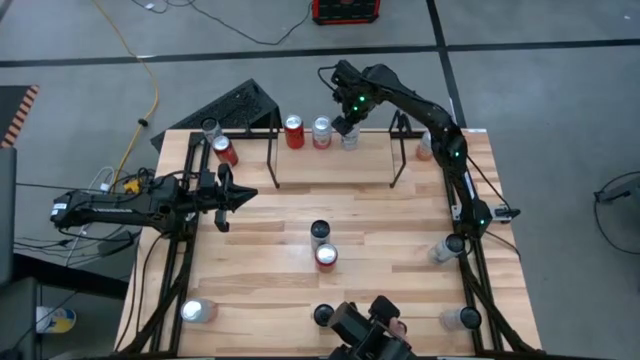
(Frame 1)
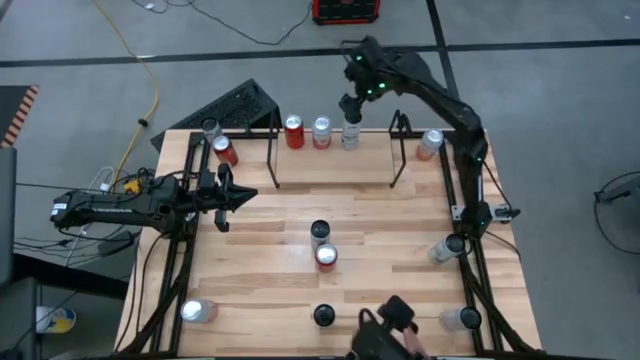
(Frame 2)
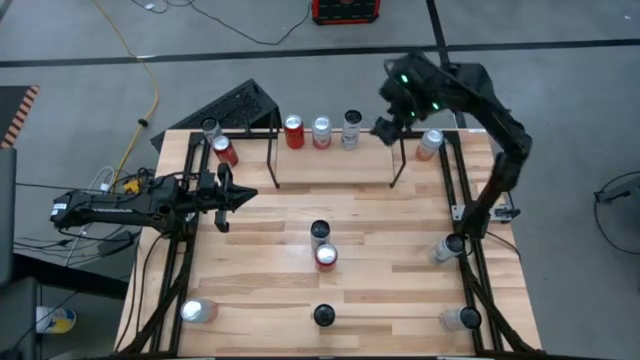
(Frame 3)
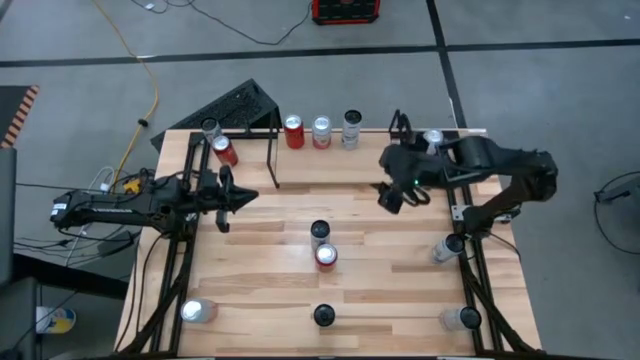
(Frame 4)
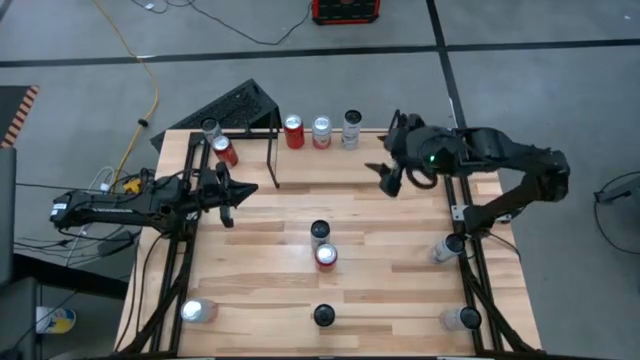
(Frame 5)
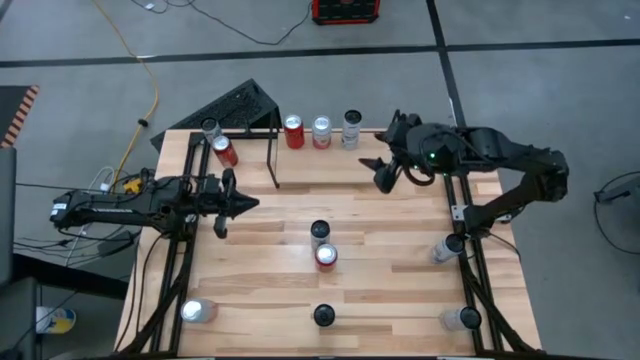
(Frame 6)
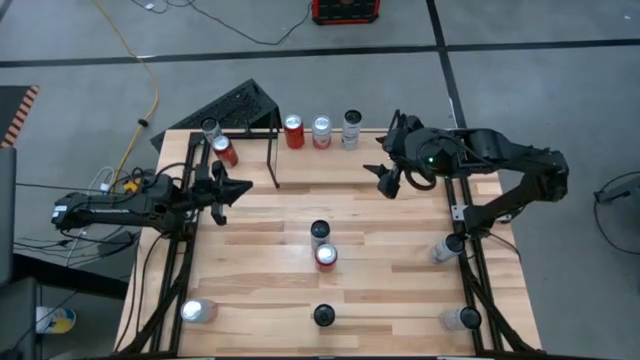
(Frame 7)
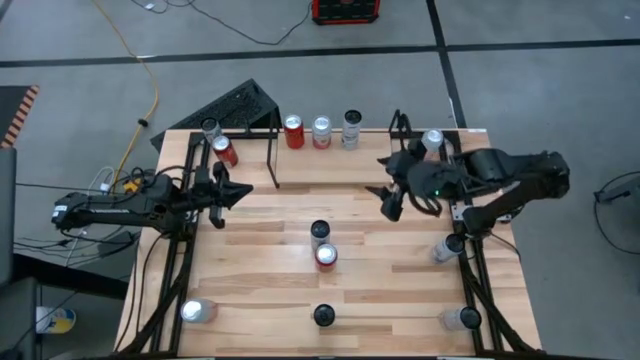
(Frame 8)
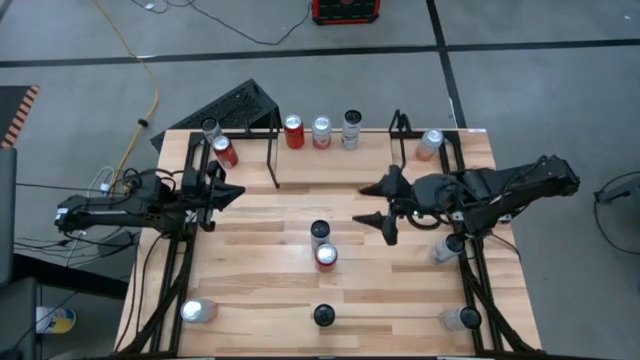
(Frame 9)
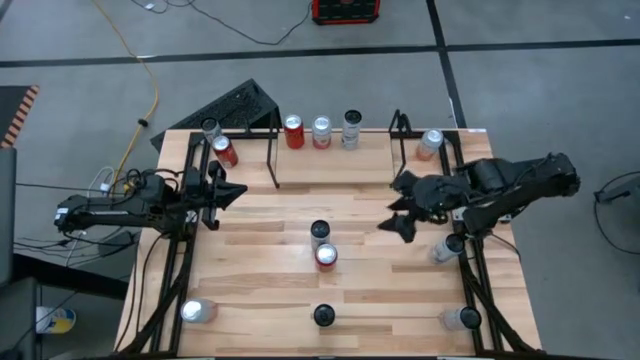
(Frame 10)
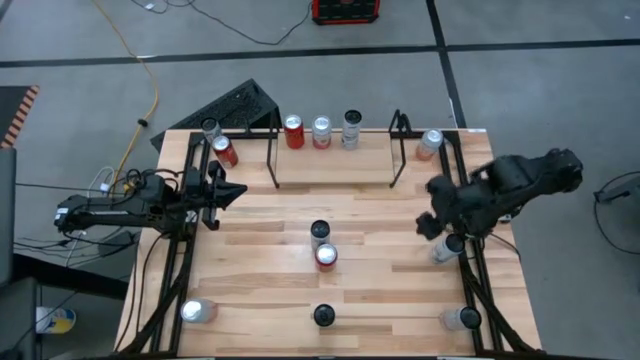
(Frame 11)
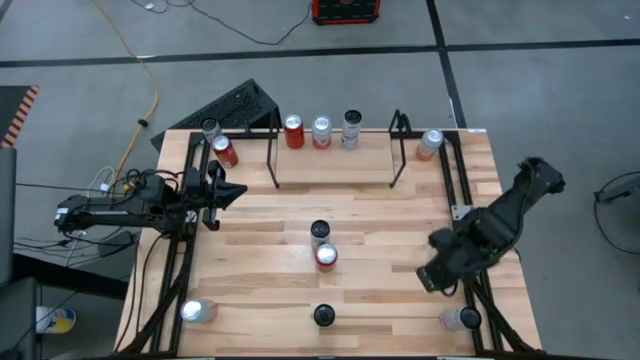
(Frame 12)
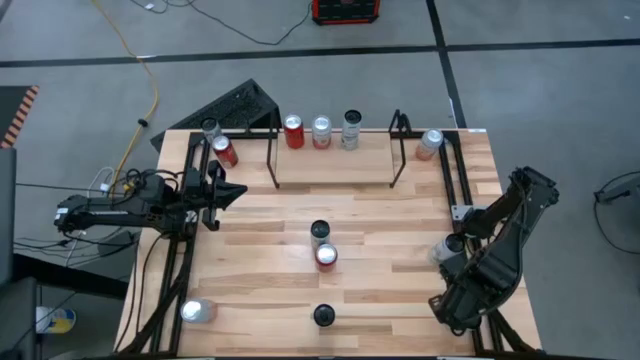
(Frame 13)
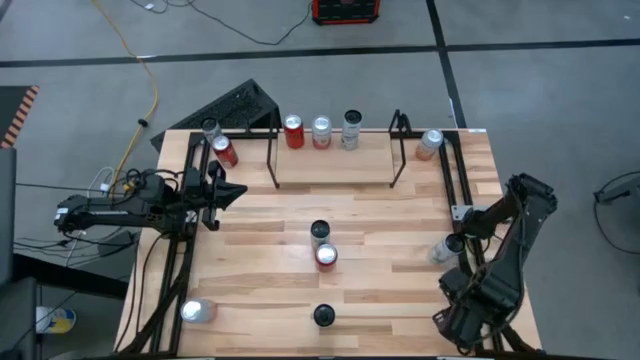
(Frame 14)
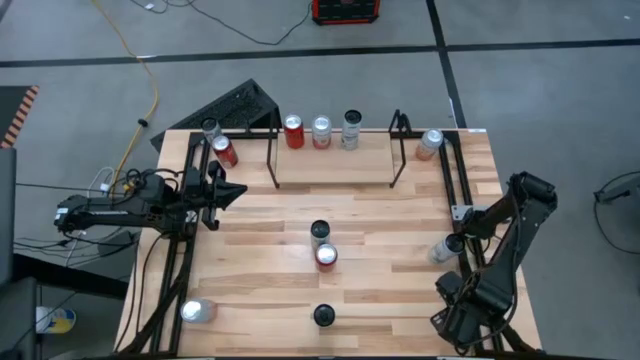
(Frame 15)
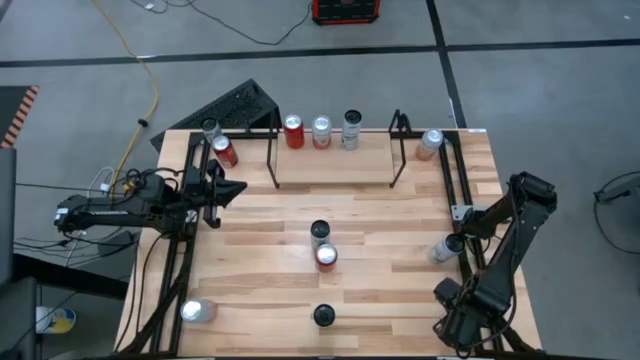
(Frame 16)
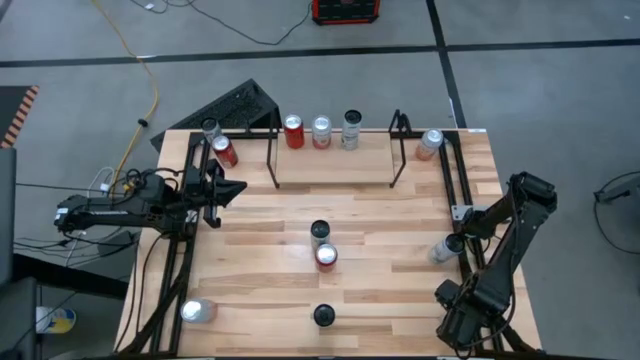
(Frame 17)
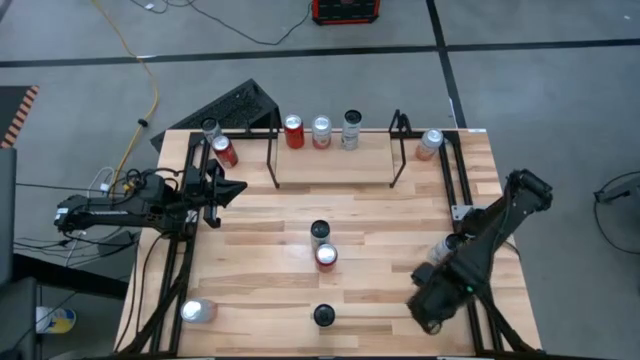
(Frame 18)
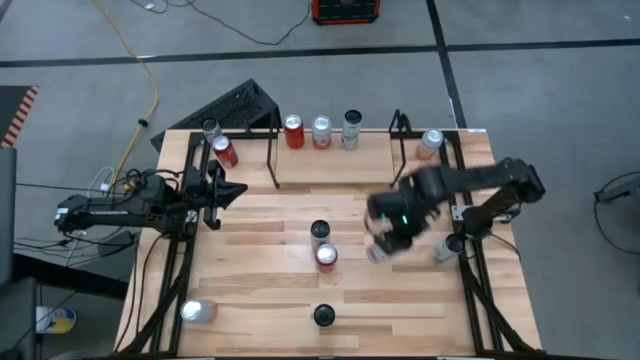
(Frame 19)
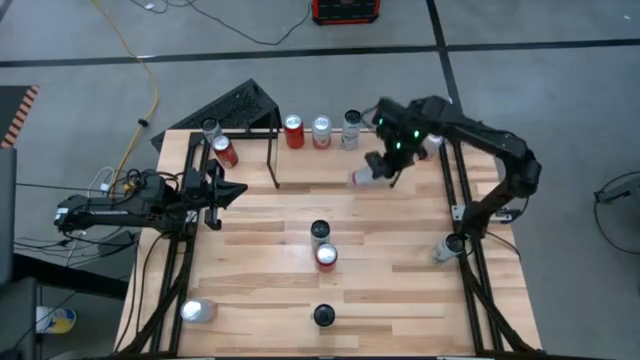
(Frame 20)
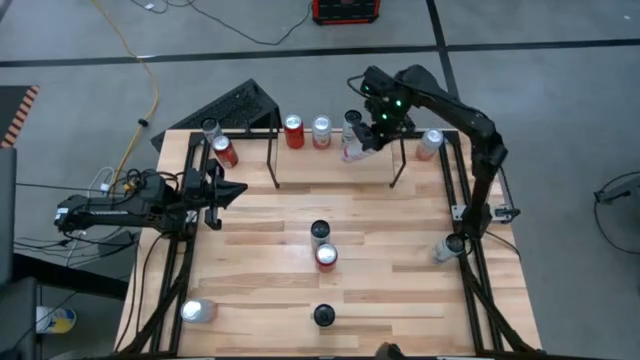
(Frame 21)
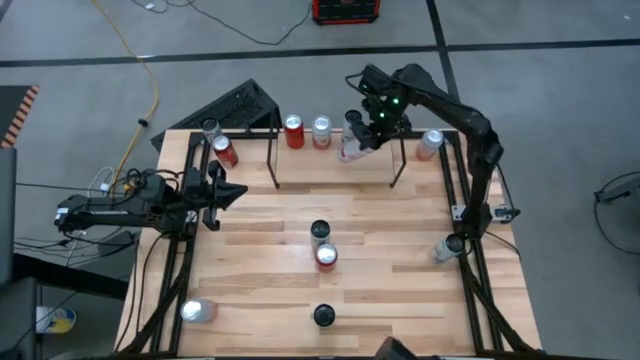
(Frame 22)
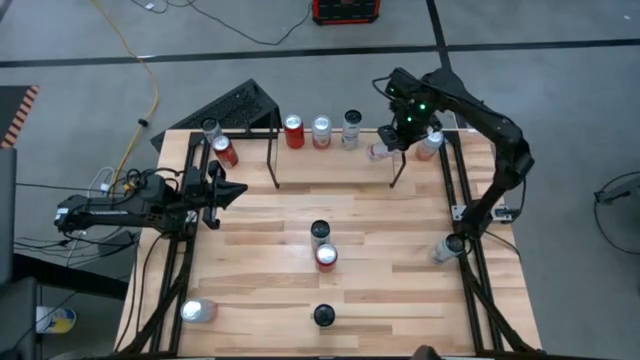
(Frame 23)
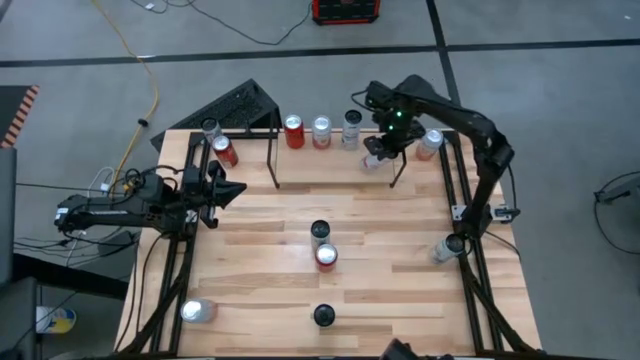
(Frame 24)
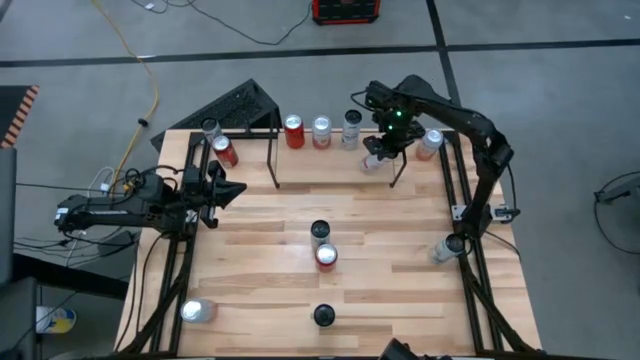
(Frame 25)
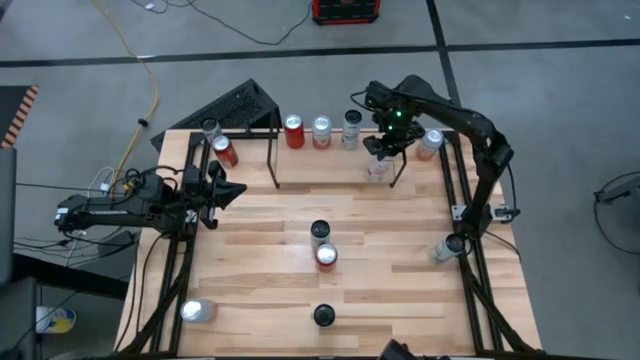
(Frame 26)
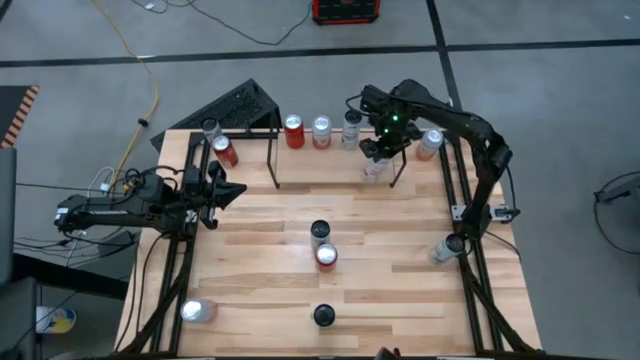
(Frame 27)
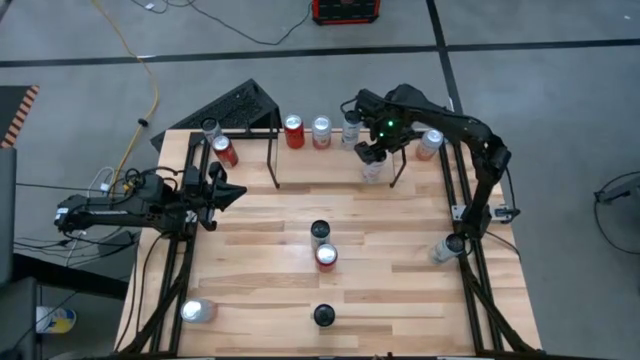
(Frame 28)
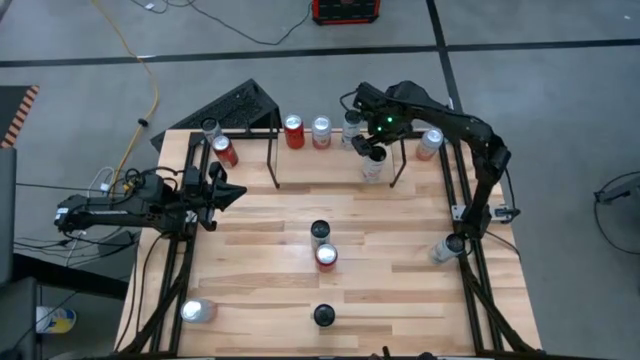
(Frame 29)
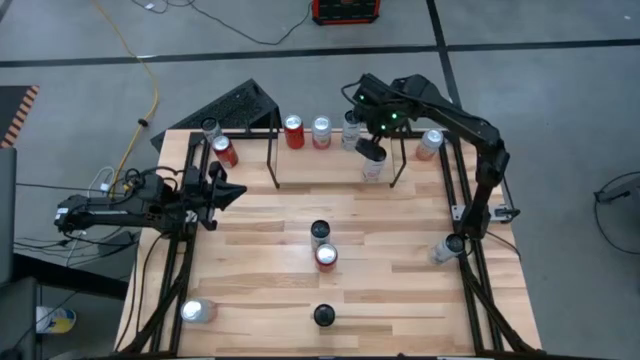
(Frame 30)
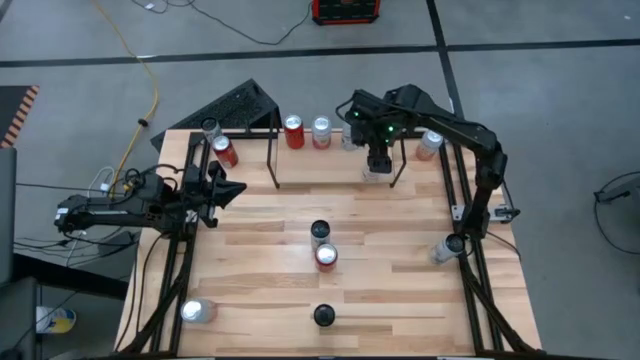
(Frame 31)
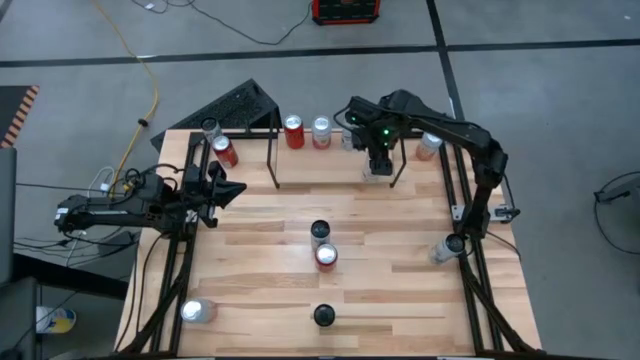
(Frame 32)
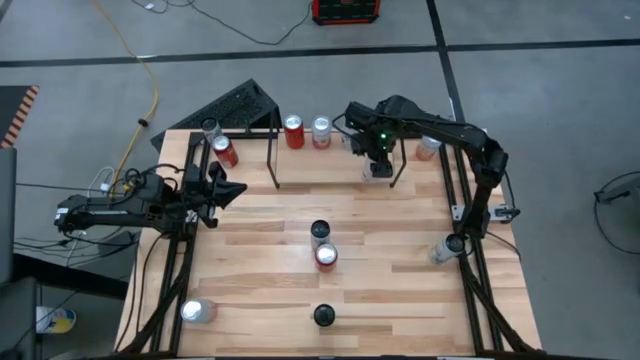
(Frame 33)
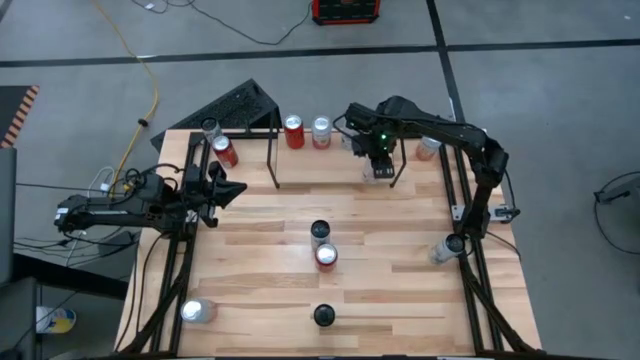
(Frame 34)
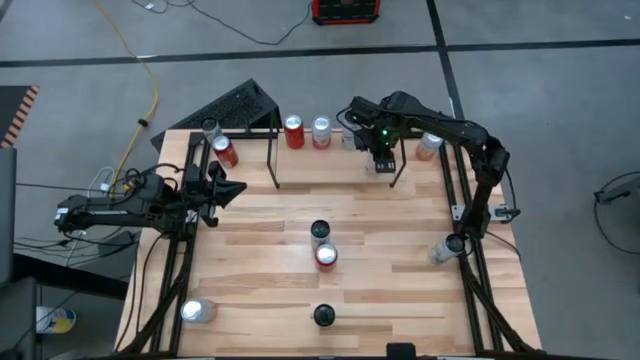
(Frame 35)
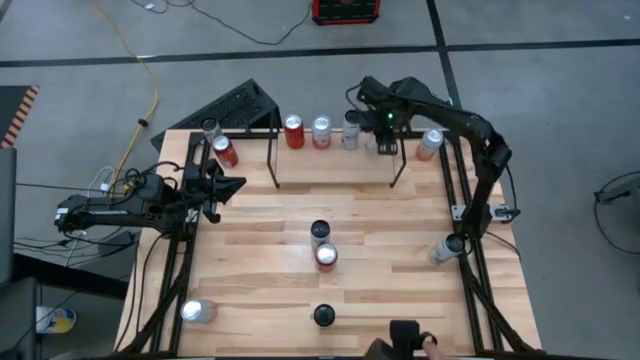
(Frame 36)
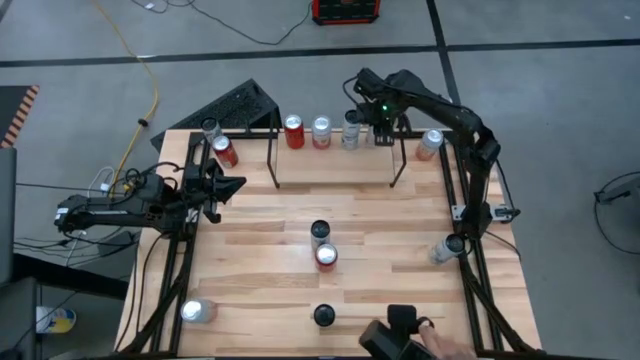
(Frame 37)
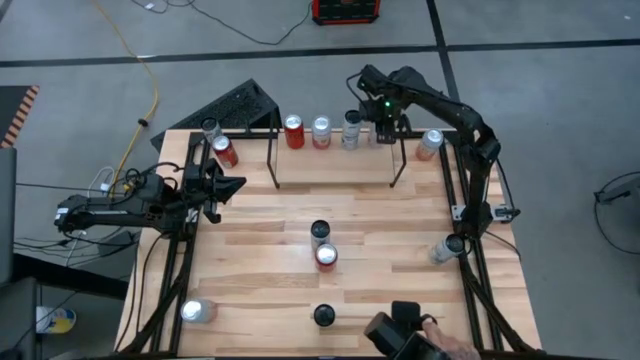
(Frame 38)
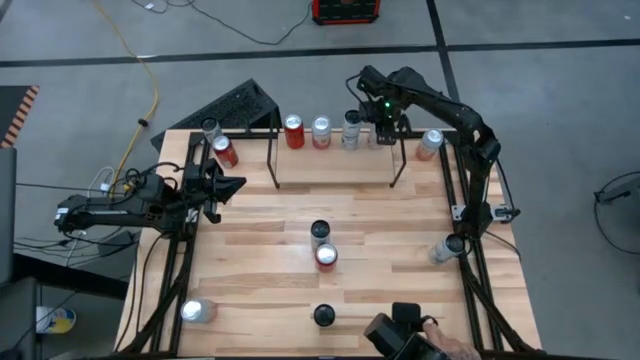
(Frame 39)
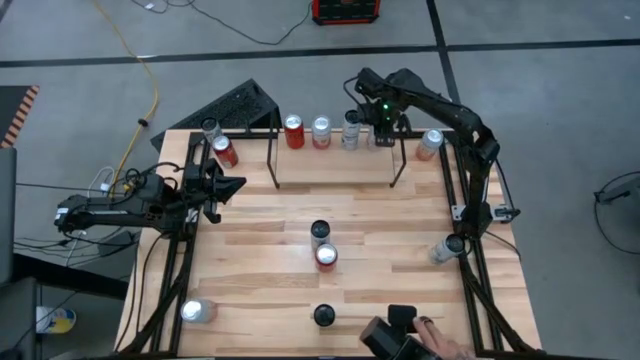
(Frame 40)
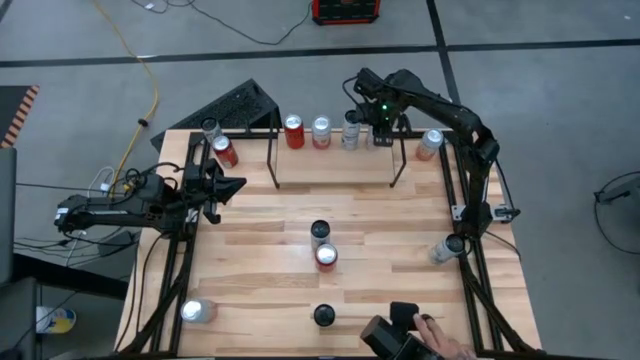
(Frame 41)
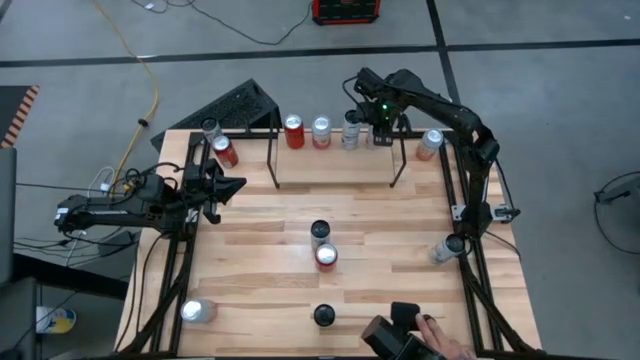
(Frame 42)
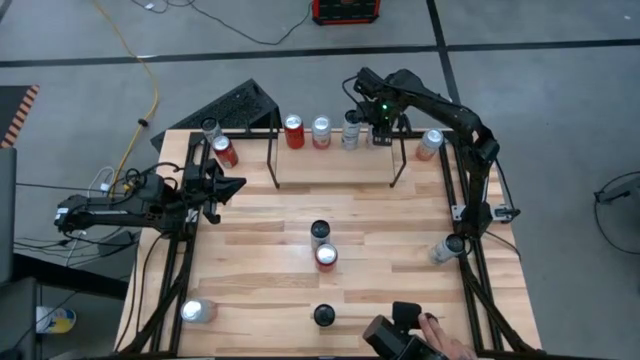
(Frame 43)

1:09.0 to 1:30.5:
Task: Place canned beverage on shelf
Put the bottom right white pink soda can on the shelf
